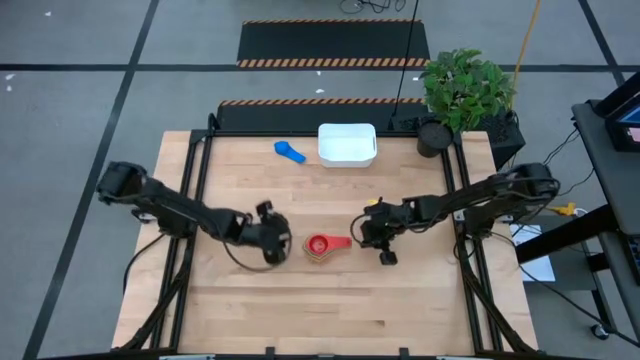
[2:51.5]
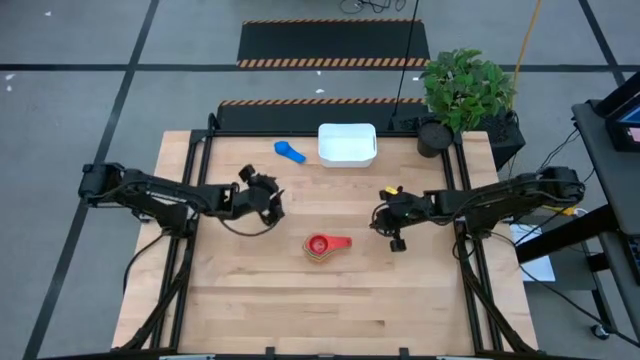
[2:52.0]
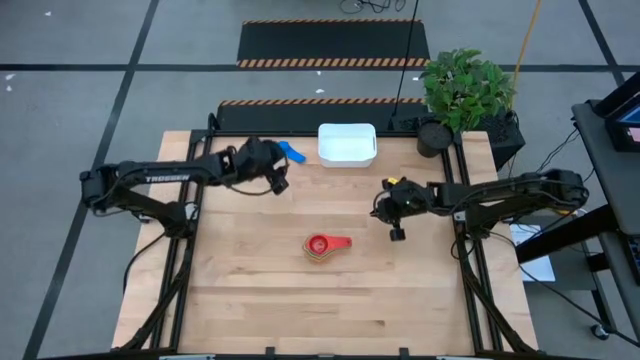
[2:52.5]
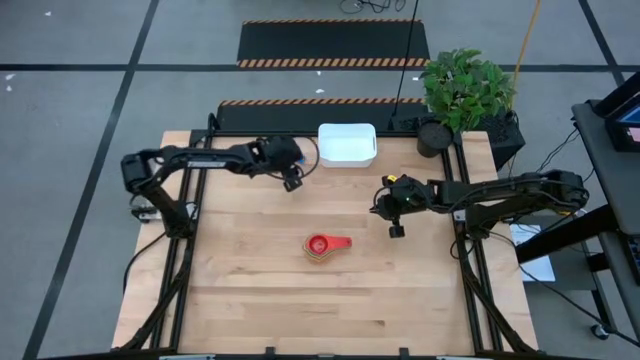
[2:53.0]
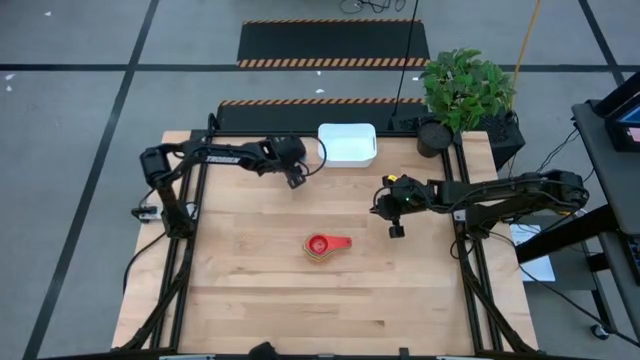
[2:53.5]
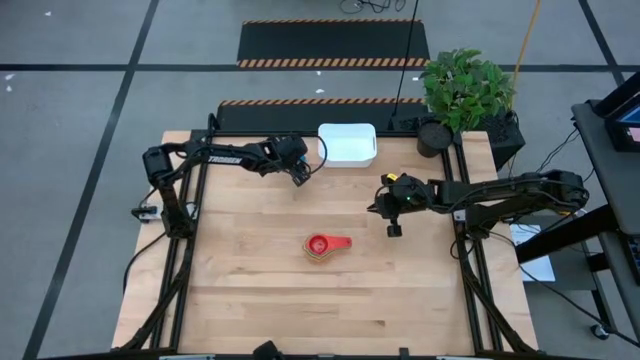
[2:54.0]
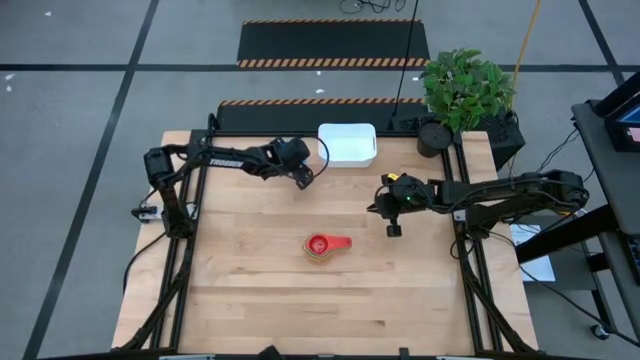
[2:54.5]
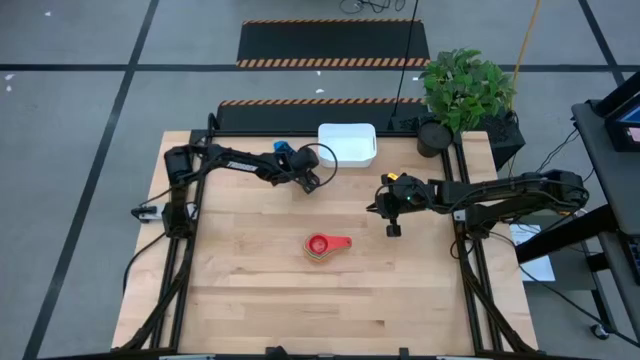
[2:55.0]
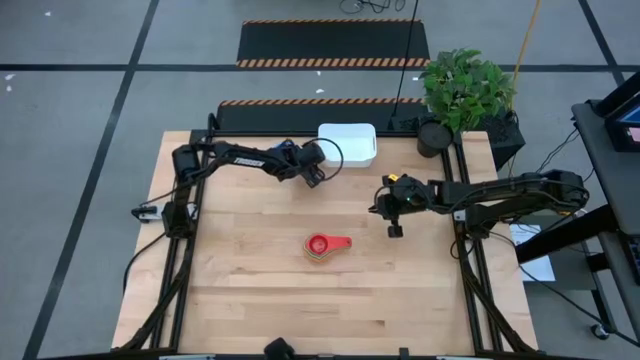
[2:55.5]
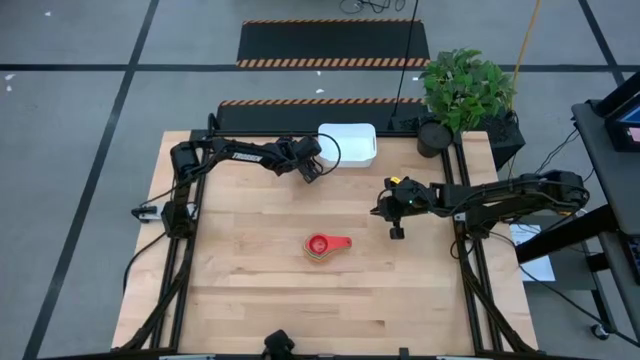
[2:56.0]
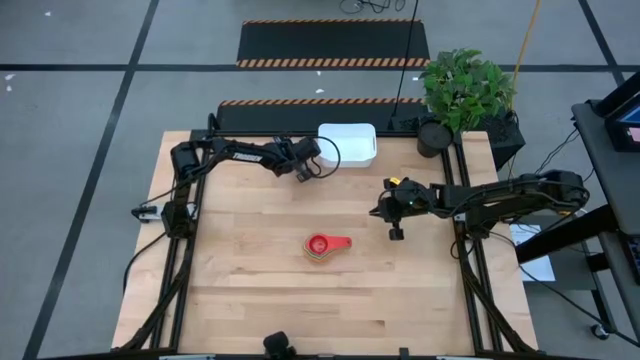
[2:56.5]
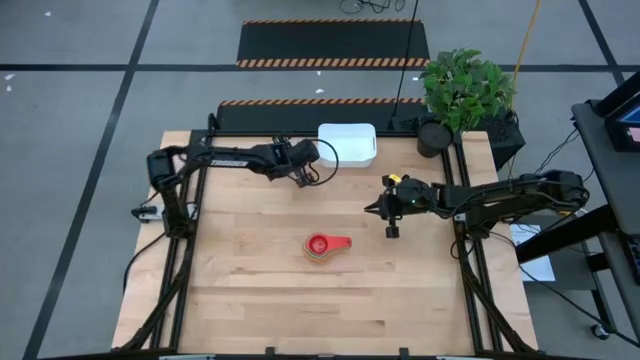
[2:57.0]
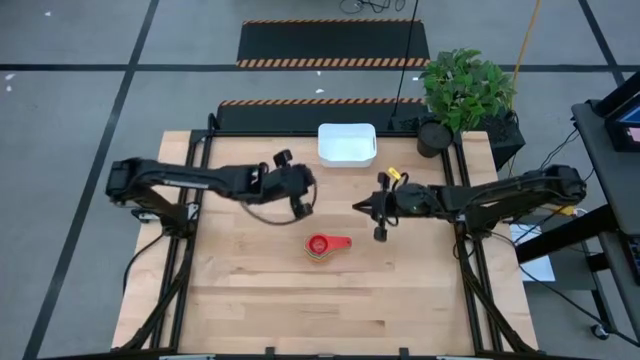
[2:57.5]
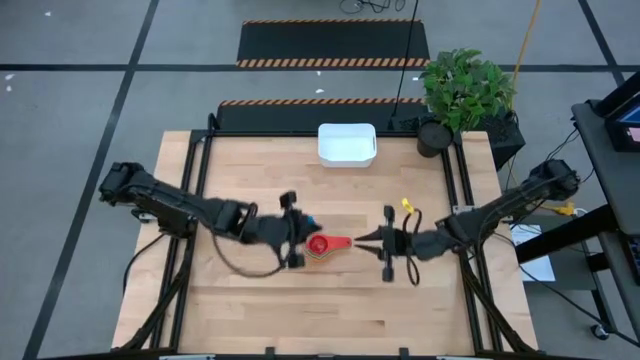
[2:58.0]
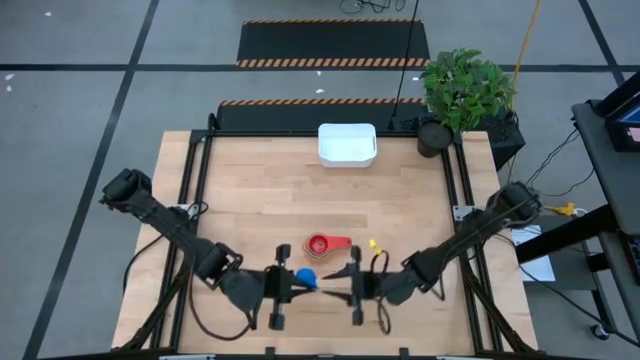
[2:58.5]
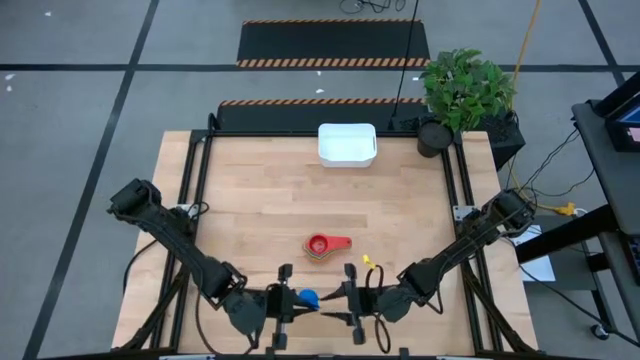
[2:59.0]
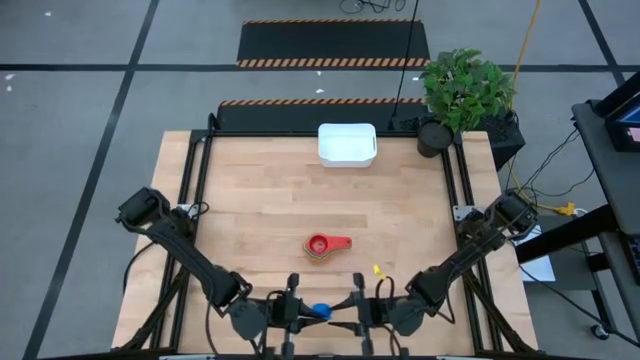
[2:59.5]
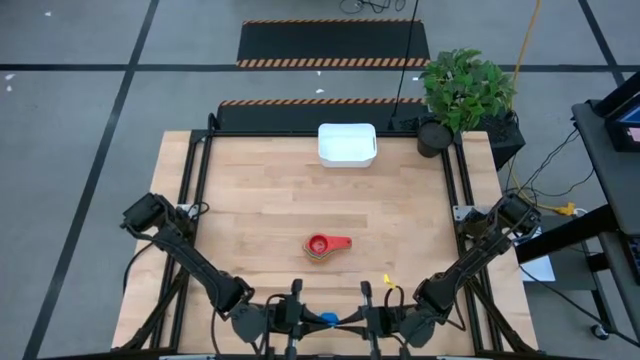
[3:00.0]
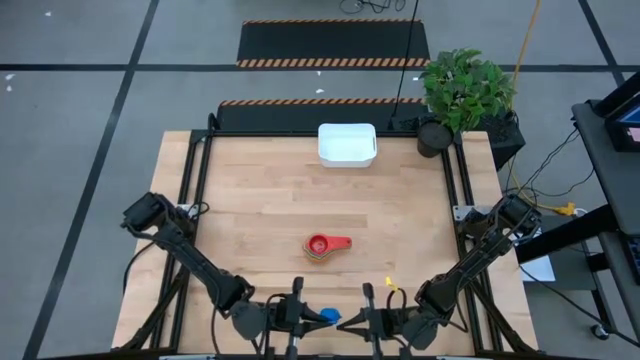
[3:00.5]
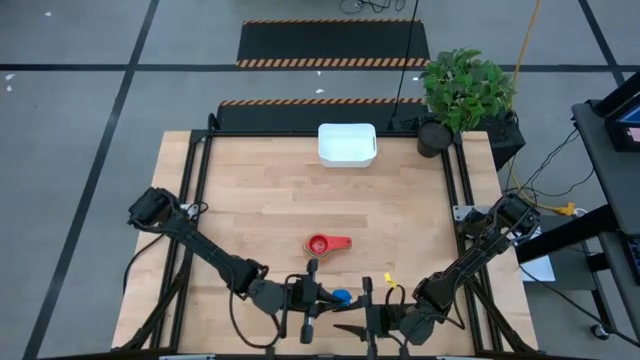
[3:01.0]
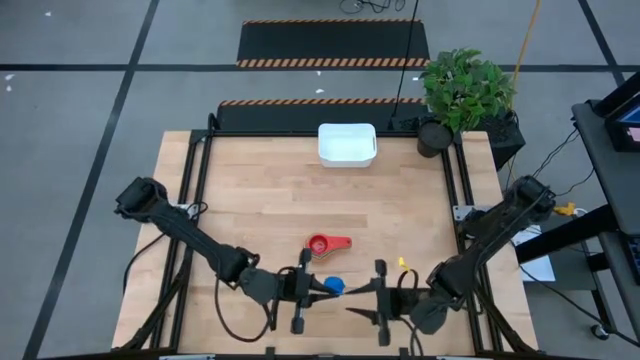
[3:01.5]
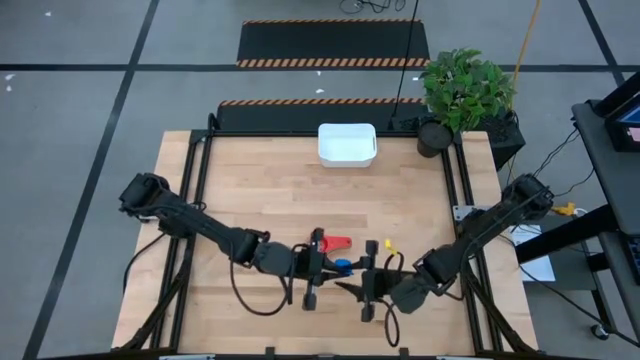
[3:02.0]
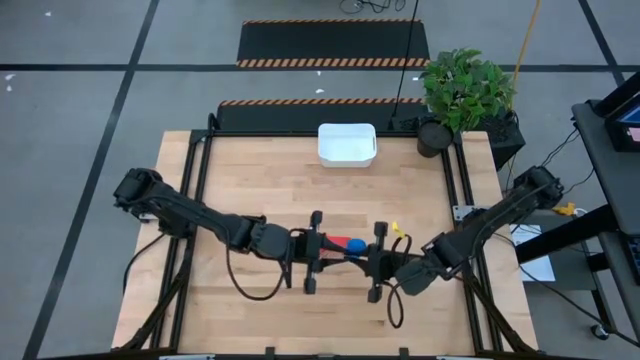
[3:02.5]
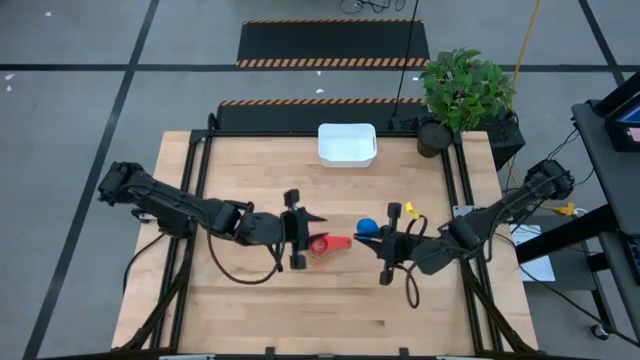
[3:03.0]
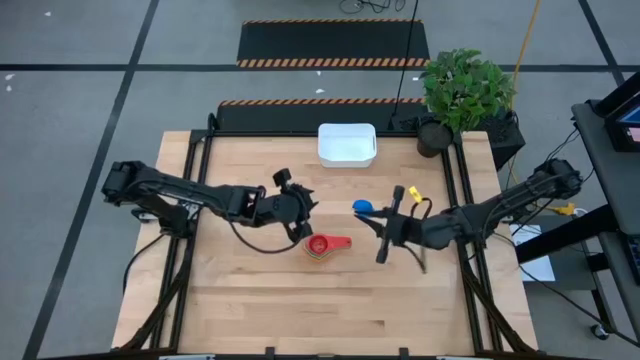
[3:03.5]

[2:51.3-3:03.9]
Task: Nest measuring cups in basket
Stack the blue measuring cup into the red measuring cup

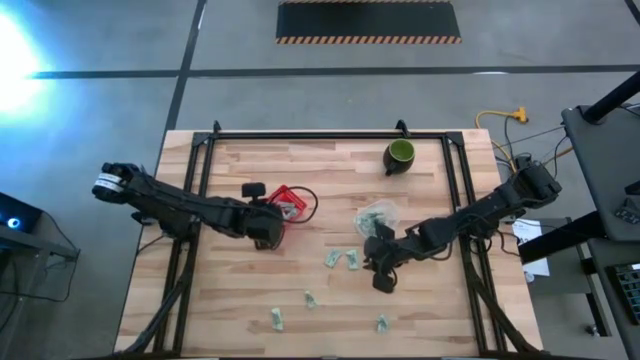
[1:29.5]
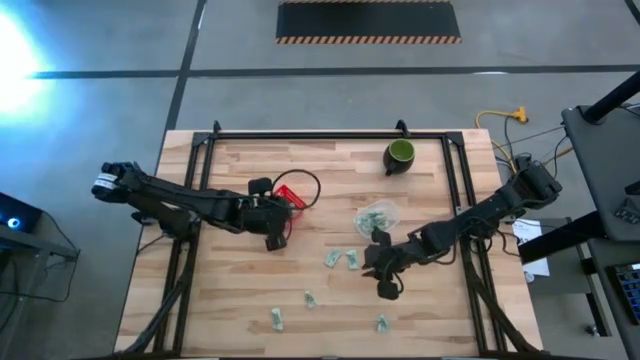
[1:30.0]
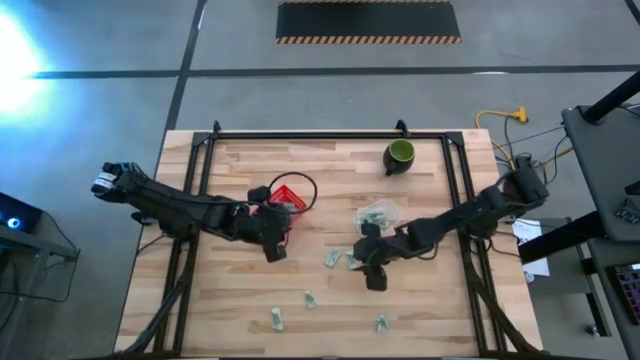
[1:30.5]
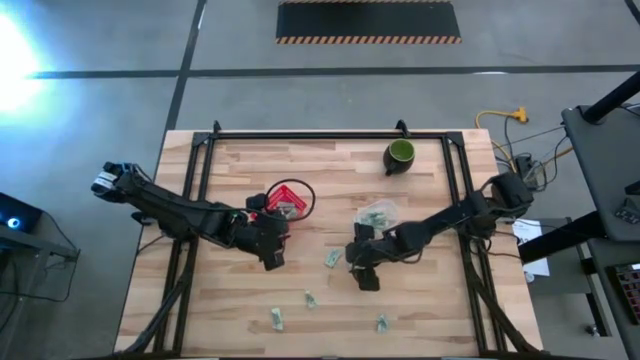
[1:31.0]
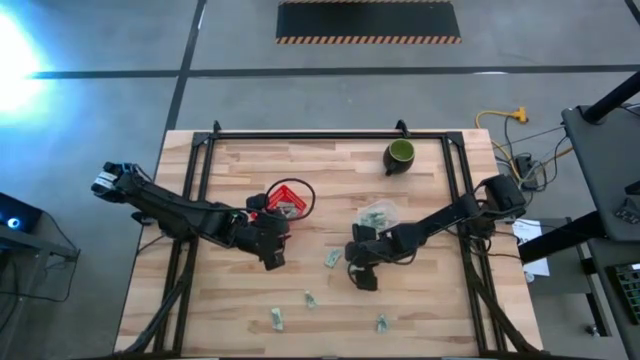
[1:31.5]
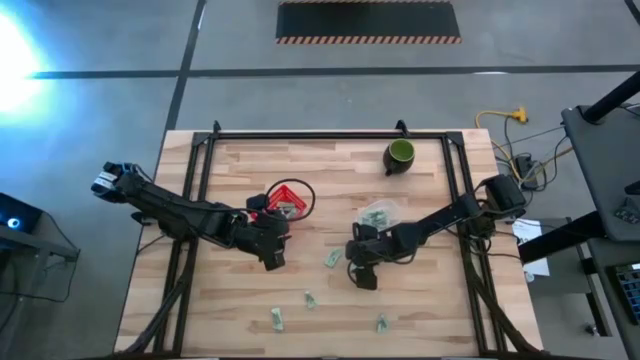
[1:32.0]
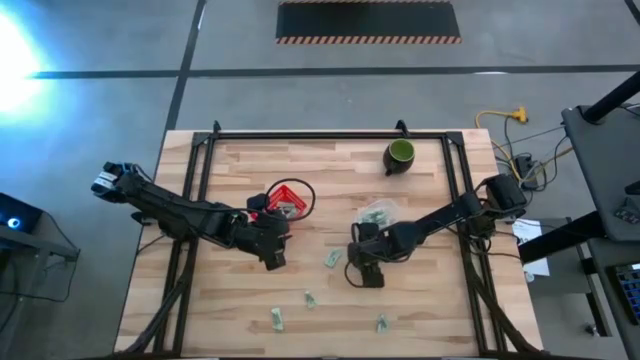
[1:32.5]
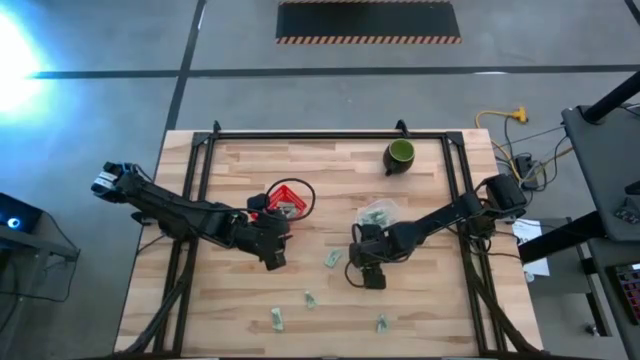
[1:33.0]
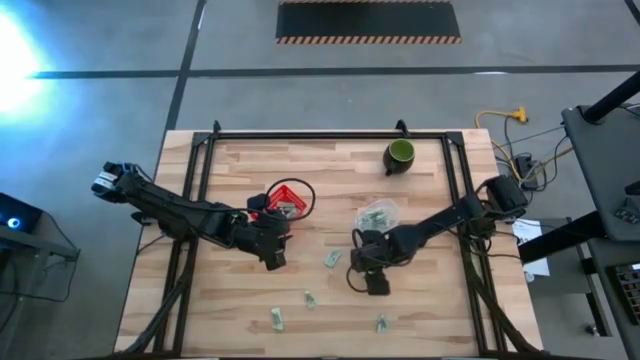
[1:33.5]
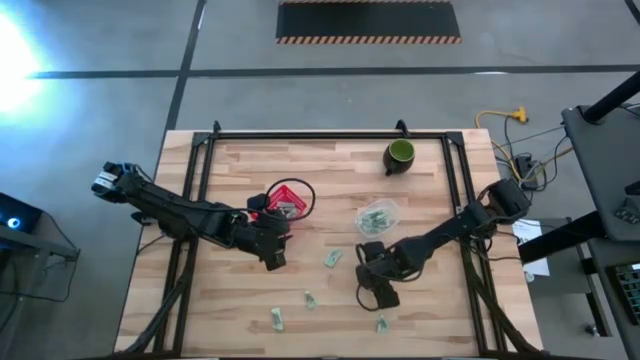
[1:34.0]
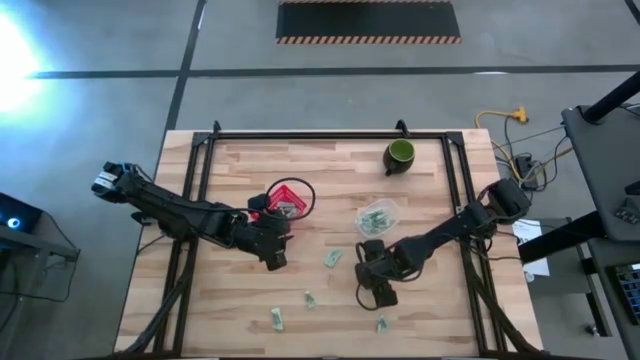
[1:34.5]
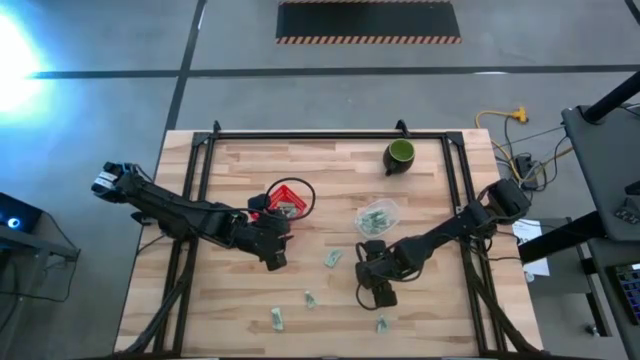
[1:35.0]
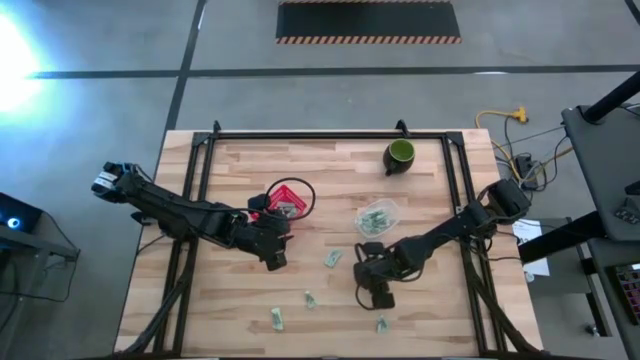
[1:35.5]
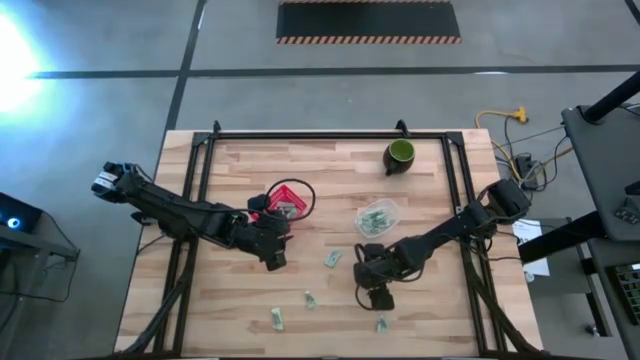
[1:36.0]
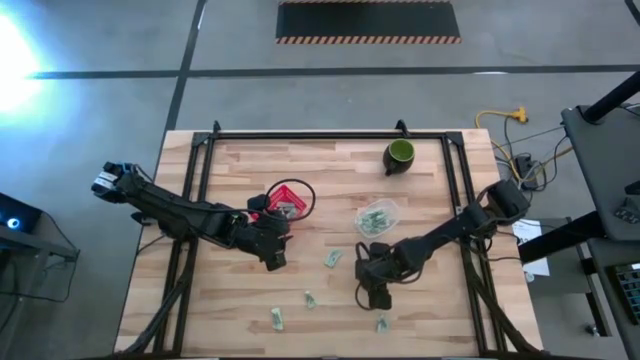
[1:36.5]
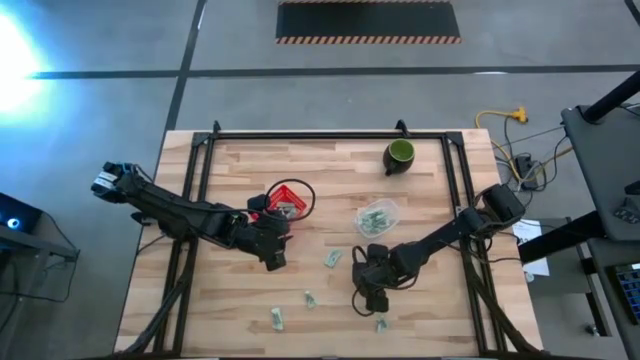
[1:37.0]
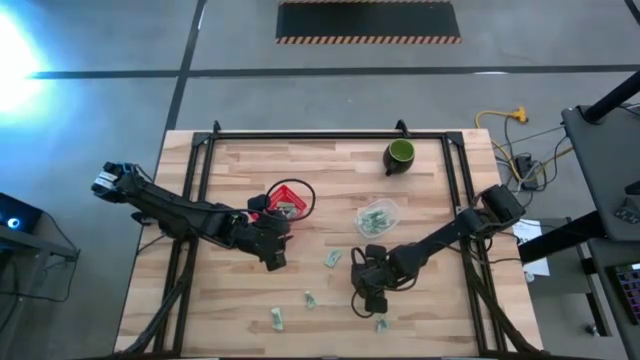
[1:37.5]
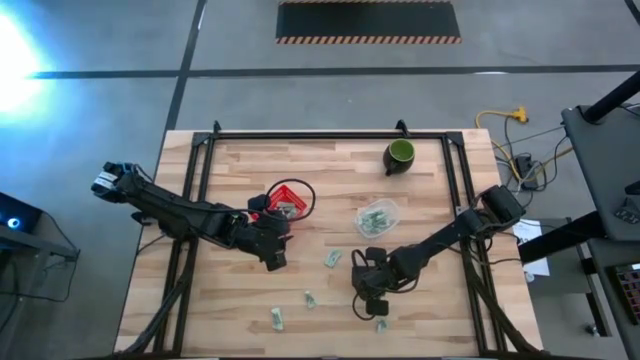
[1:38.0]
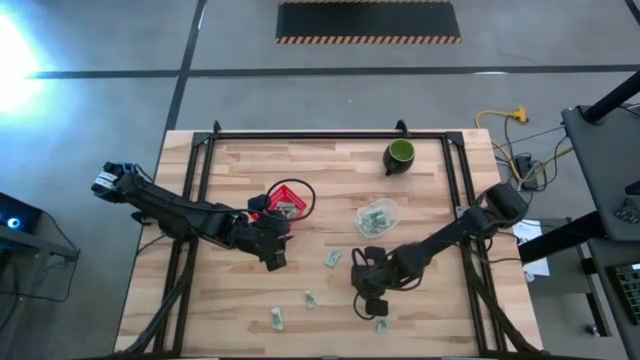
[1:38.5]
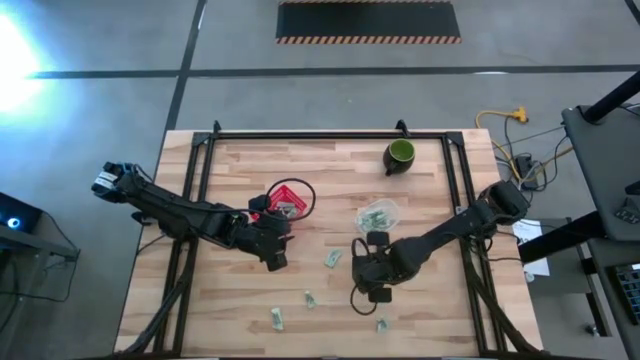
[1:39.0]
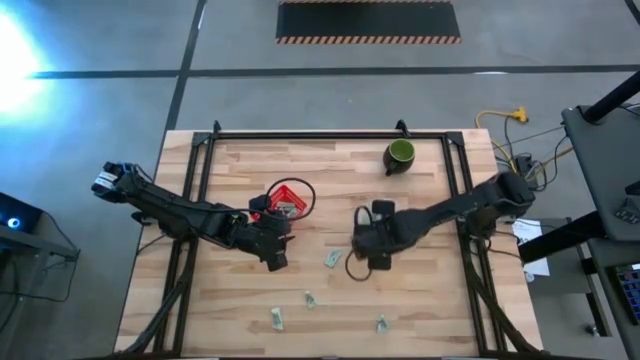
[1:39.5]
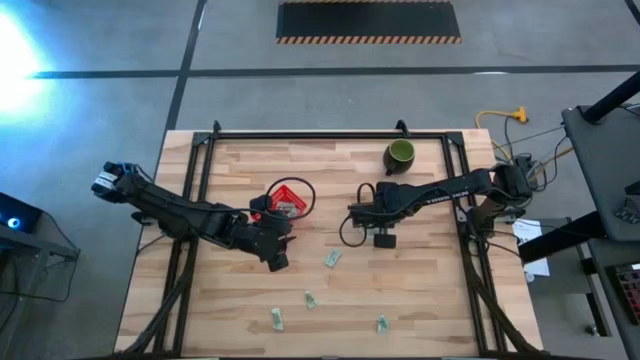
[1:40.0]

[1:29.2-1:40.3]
Task: Pick and place items into bin
Put the stevia packet into the transparent bin
